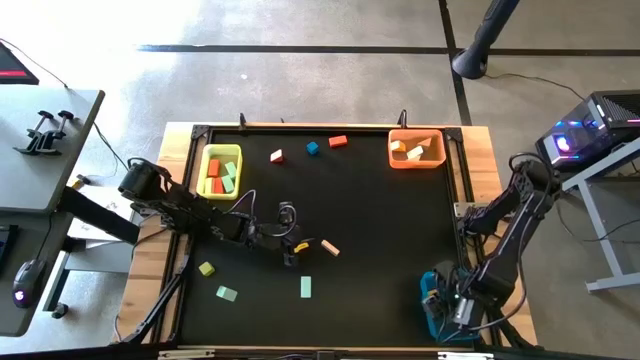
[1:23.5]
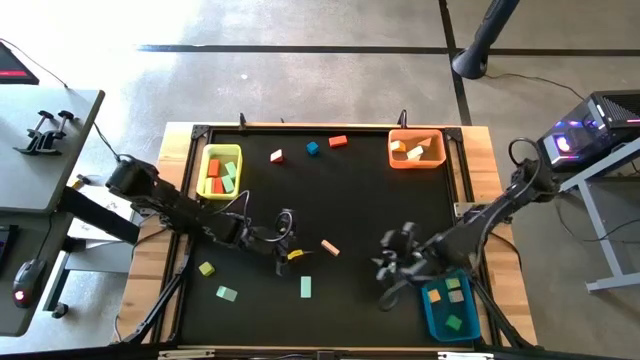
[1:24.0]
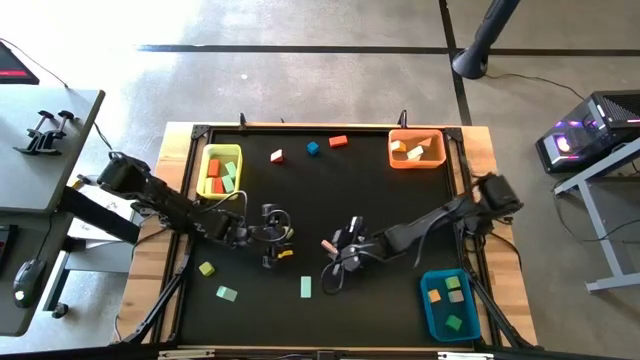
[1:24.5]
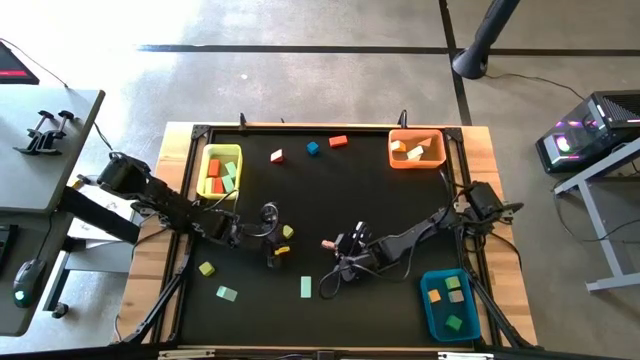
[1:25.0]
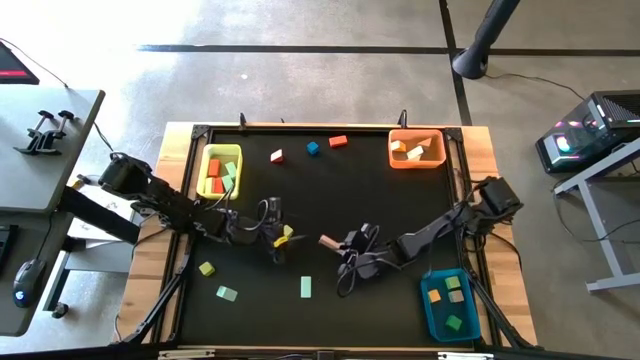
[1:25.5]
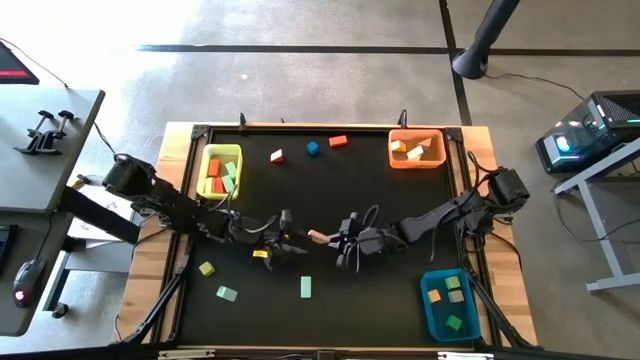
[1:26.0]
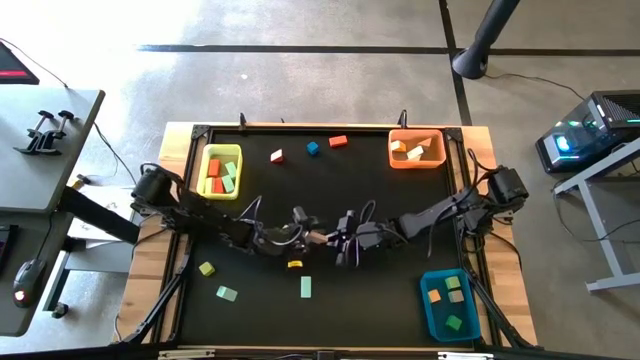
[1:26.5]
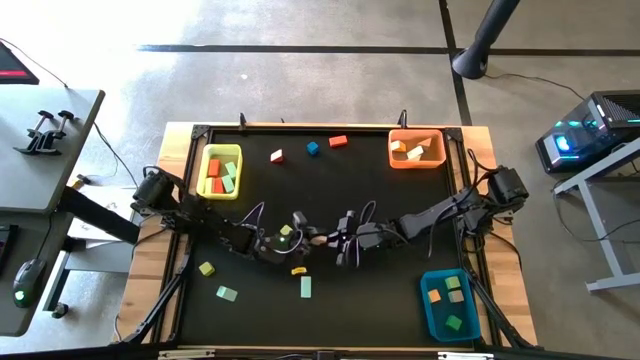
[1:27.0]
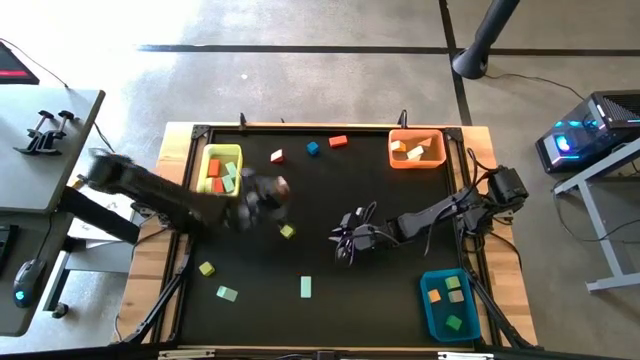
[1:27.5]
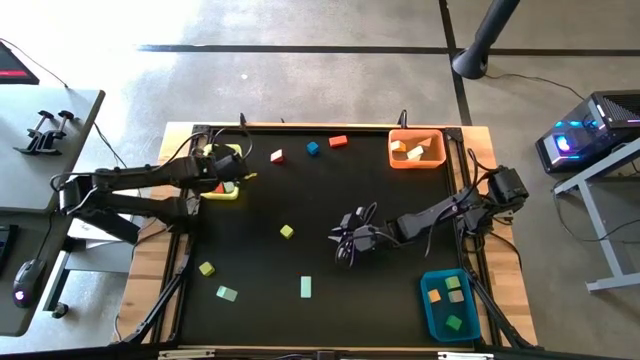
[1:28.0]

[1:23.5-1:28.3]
Task: Sort blocks by size
Put the light orange rectangular block into the yellow bin

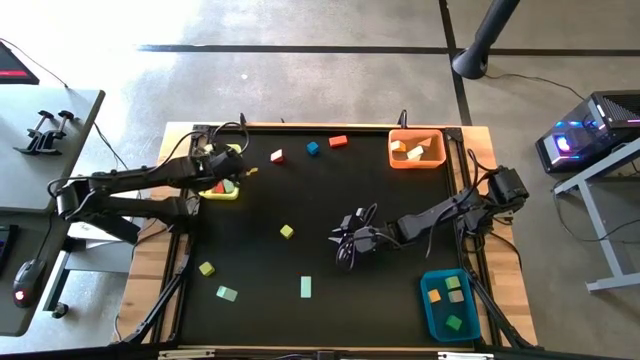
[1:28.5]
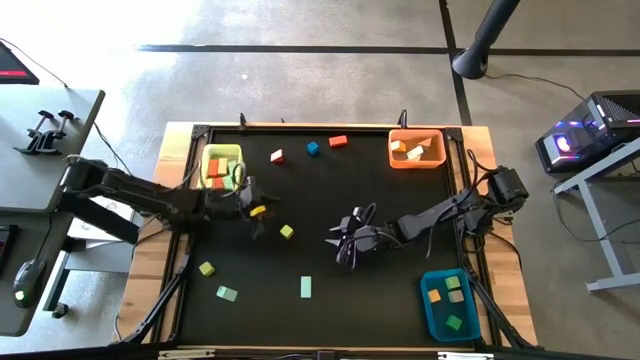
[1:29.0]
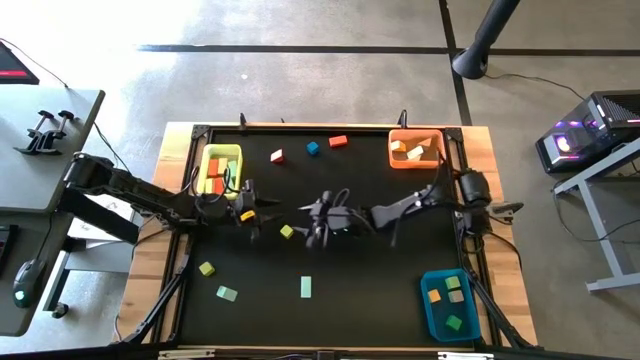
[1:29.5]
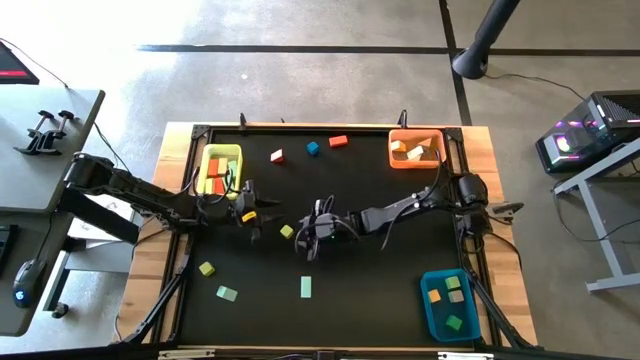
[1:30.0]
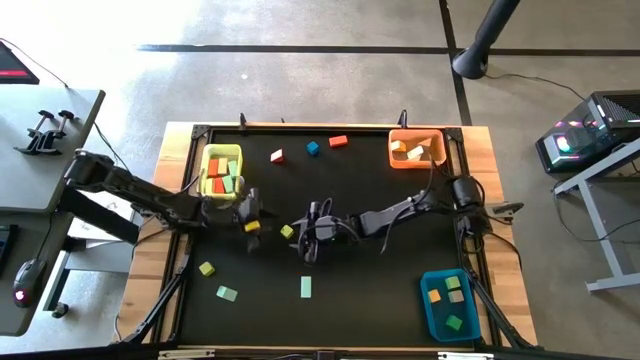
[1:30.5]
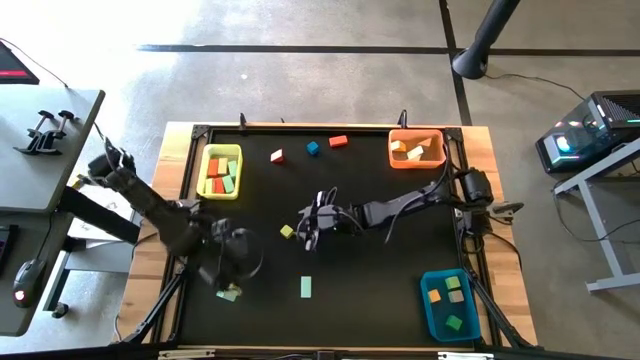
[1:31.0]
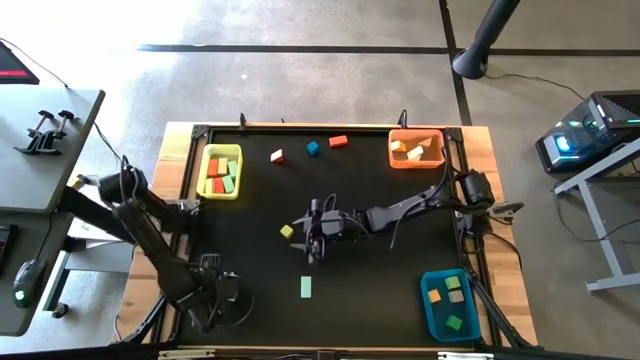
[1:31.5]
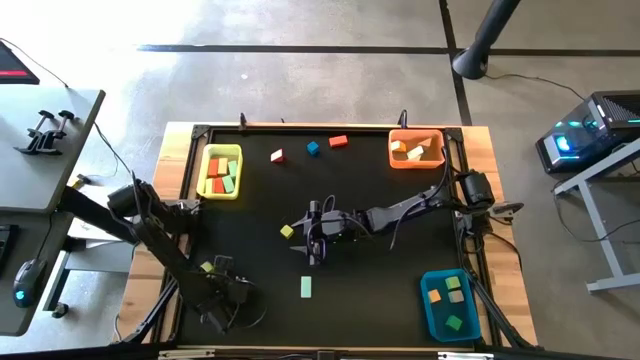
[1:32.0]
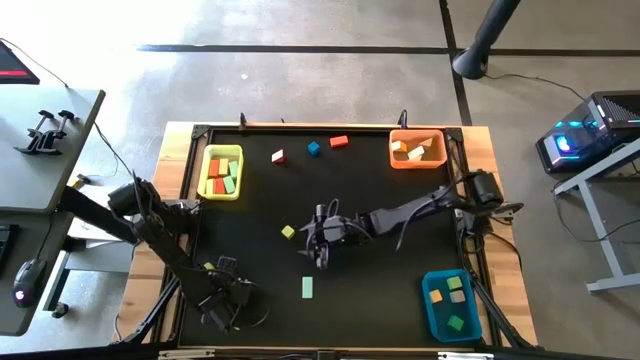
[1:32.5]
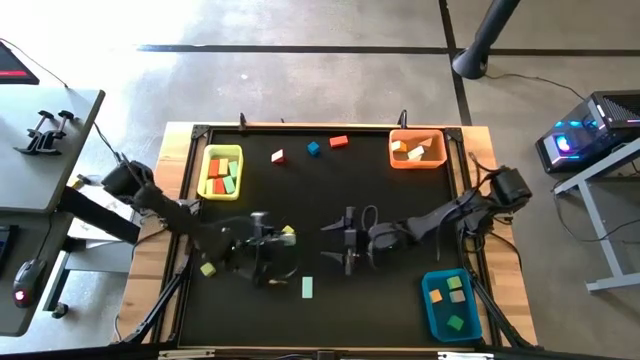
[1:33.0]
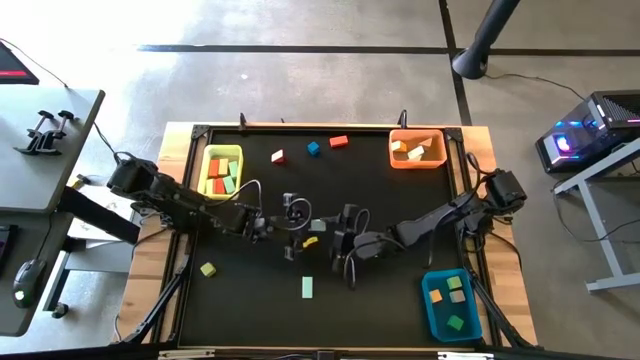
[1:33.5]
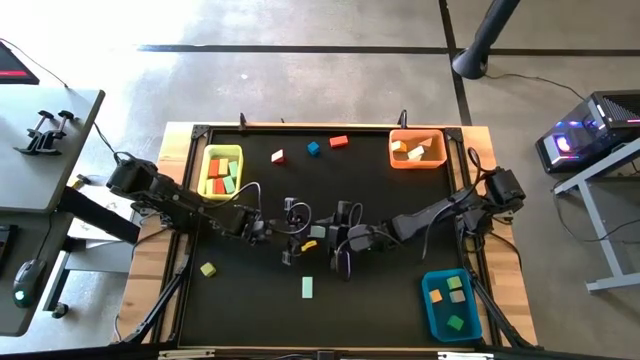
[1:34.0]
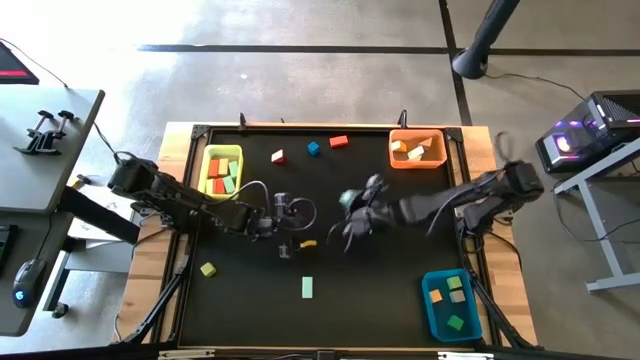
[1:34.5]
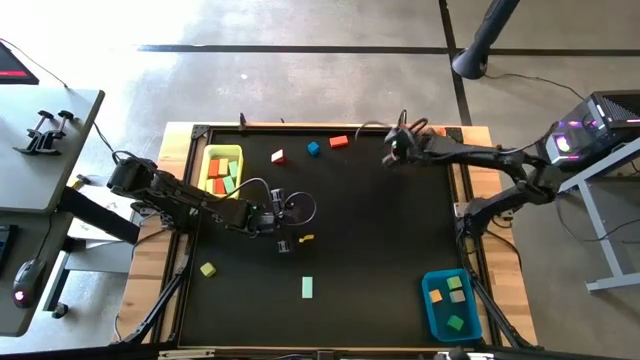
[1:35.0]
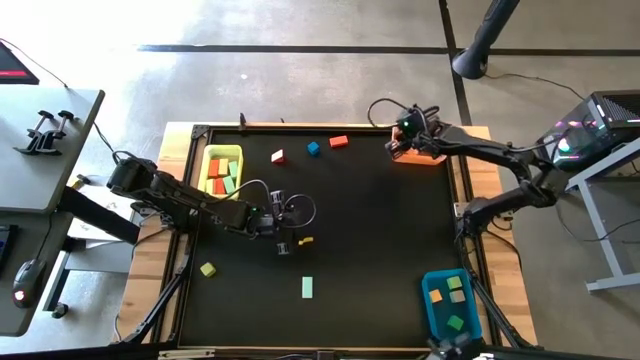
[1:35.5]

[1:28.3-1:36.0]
Put the light blue triangular block into the orange bin

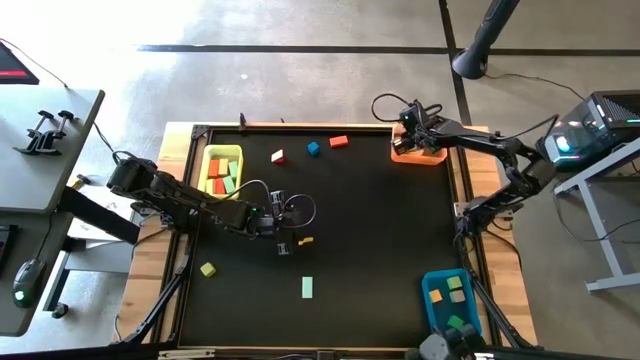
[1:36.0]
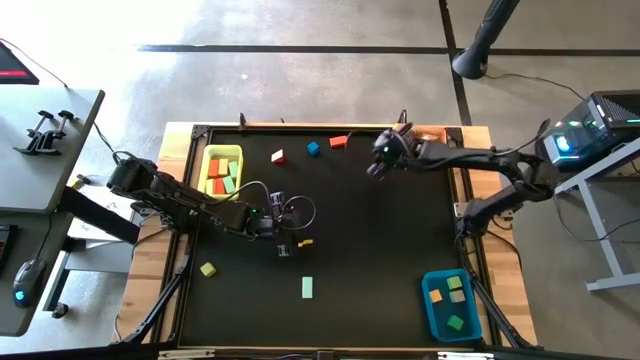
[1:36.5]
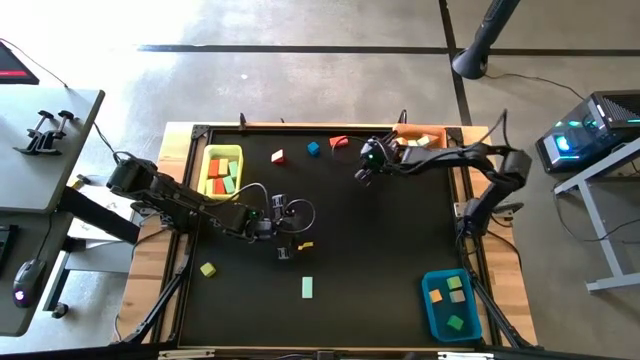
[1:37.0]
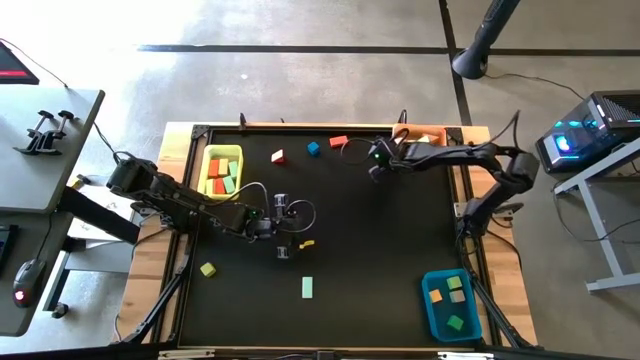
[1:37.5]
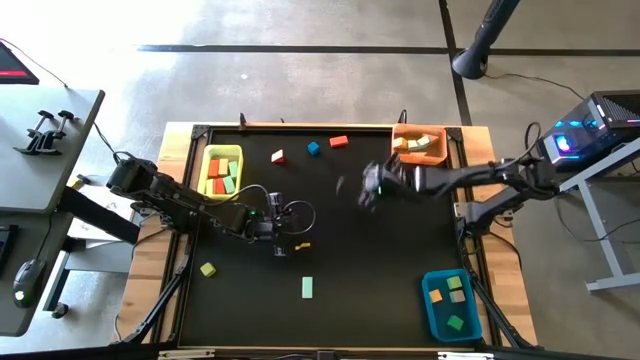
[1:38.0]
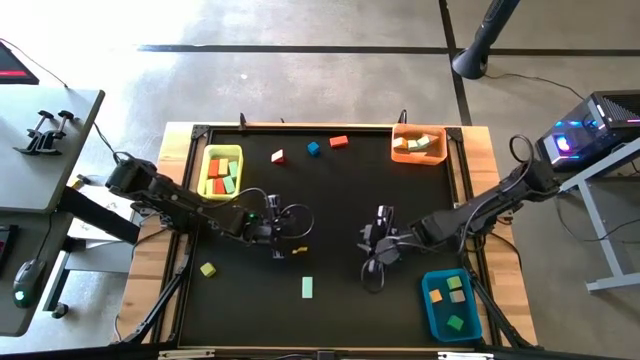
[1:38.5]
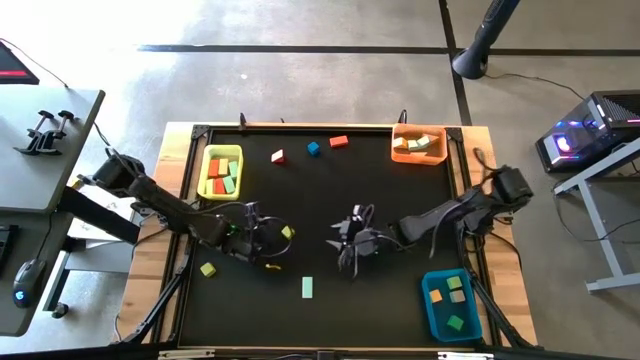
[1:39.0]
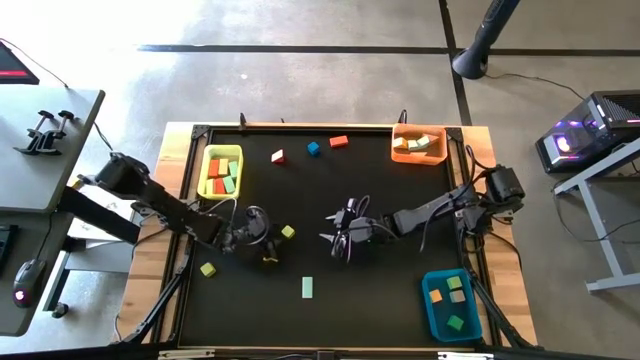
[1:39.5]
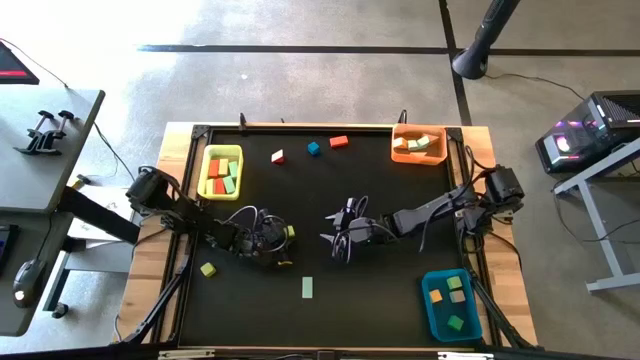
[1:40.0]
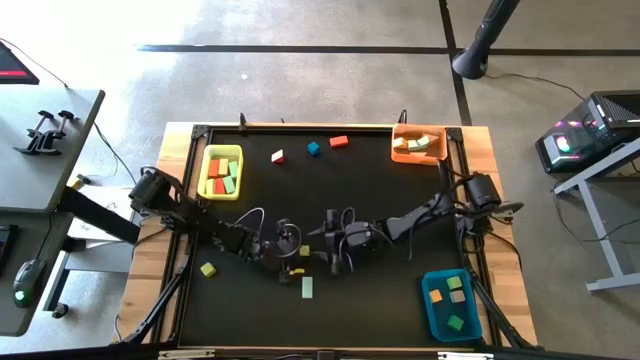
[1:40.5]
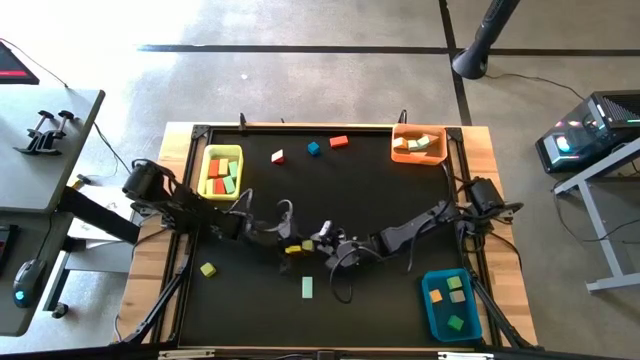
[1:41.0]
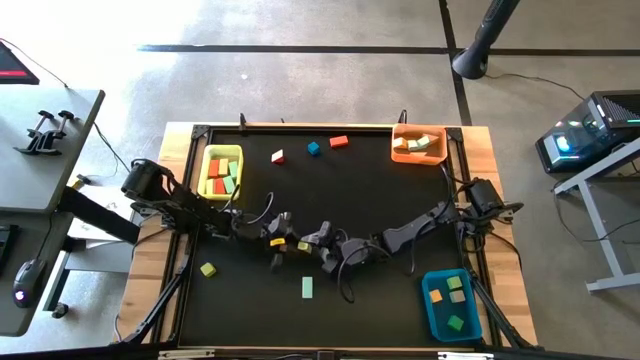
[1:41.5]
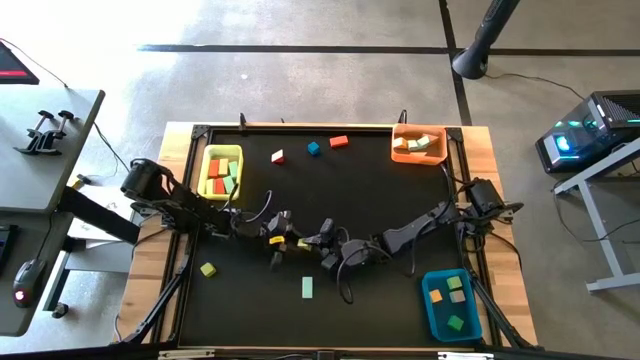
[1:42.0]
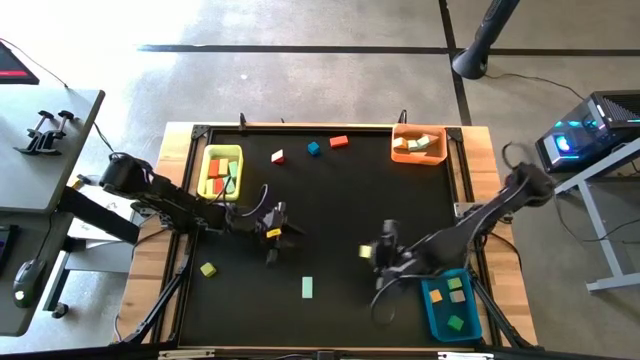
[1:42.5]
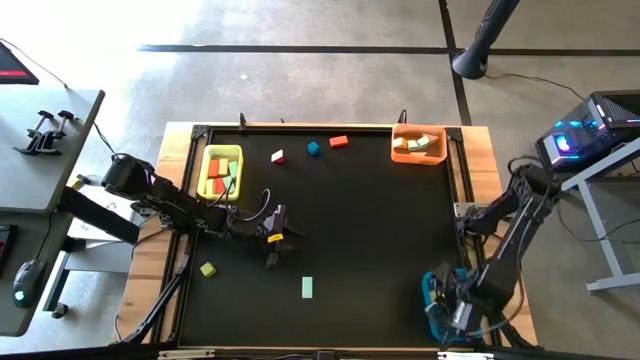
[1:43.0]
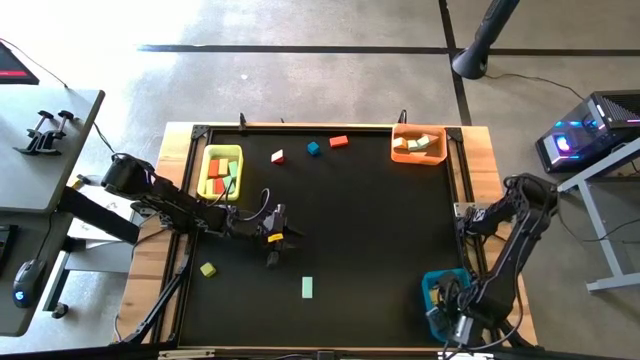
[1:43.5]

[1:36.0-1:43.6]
Put the yellow square block into the blue bin

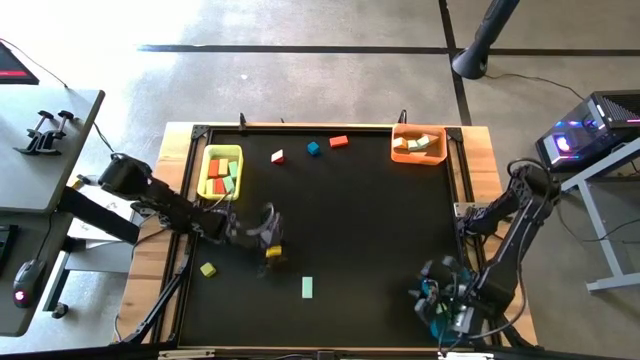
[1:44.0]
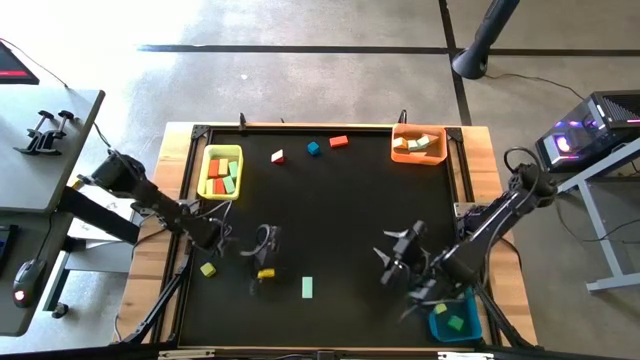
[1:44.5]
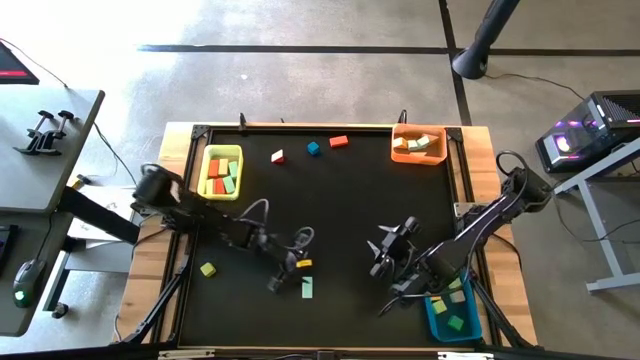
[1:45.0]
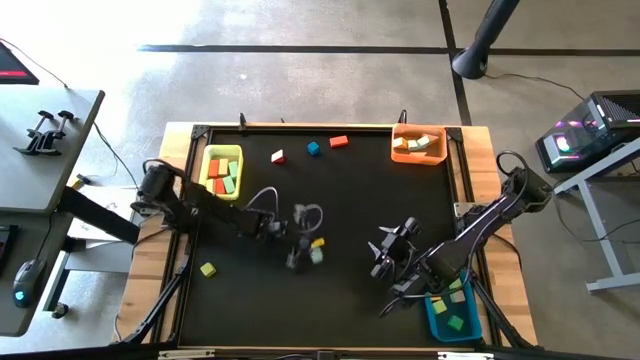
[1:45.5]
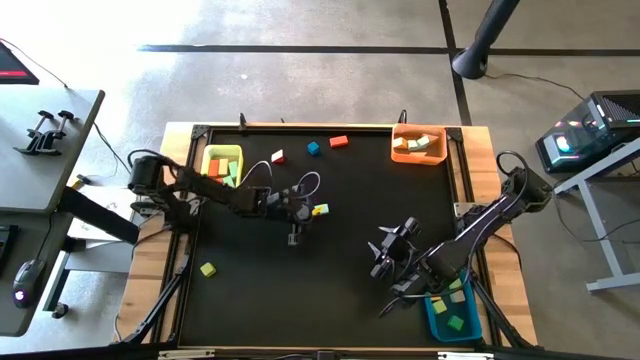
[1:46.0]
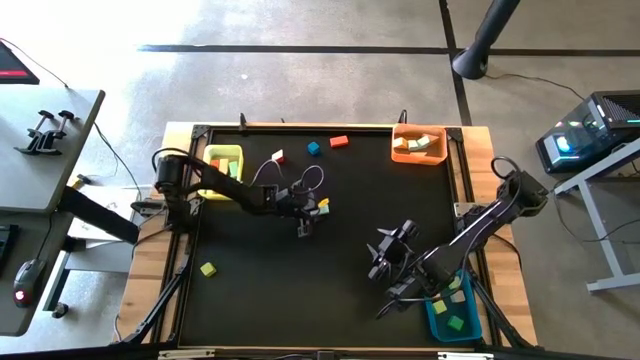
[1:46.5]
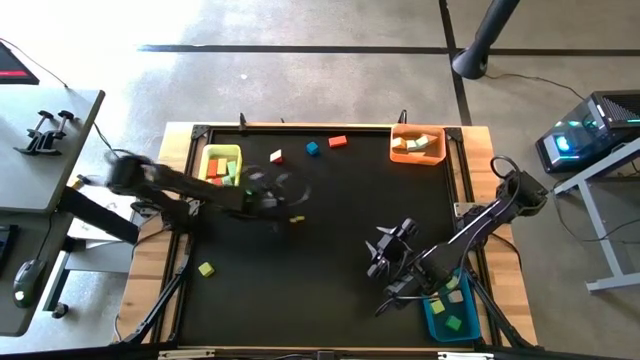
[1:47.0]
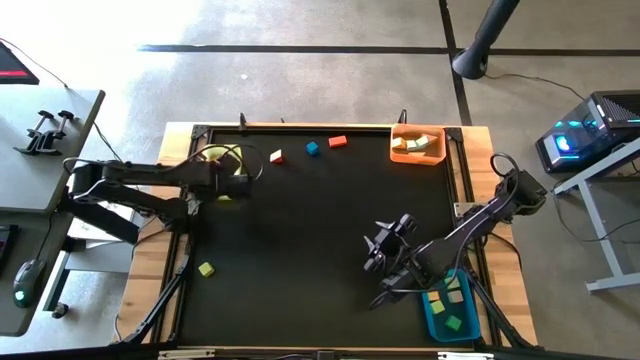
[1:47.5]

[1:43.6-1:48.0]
Put the light blue rectangular block into the yellow bin
